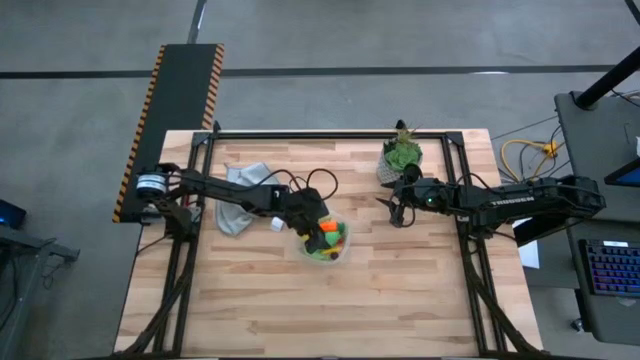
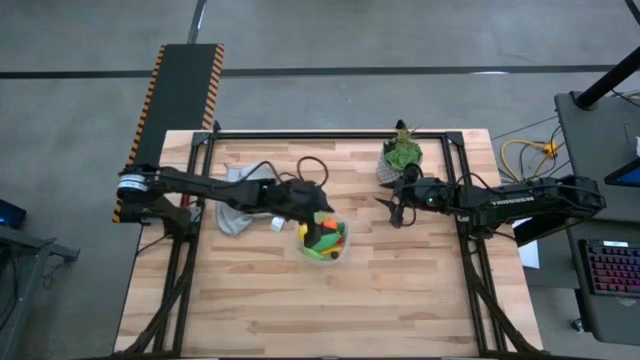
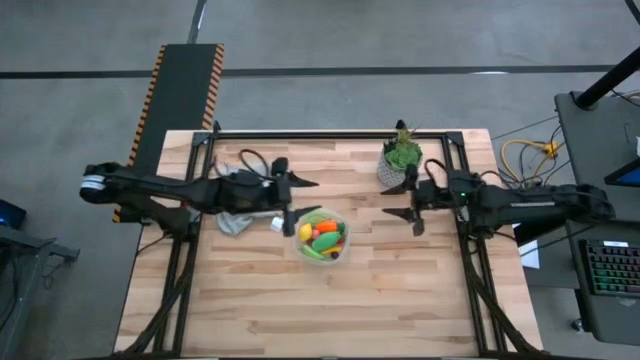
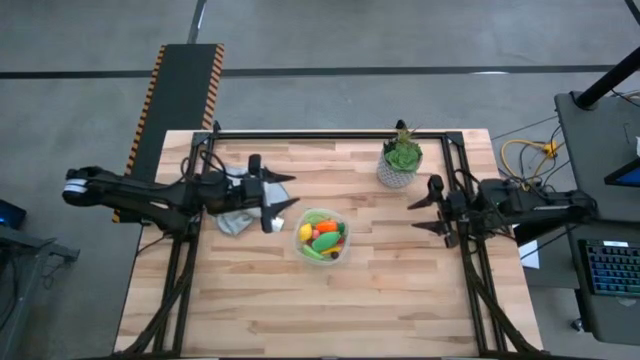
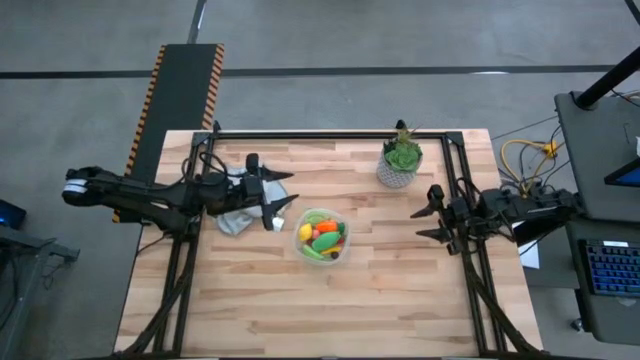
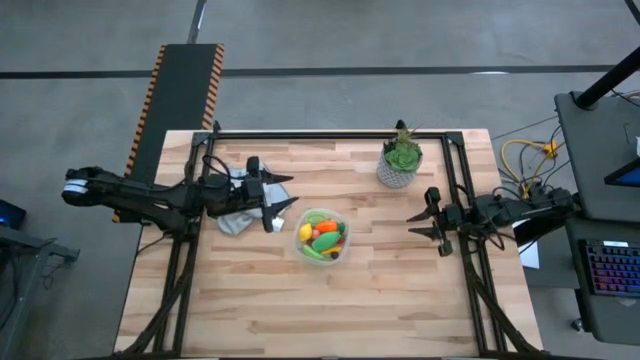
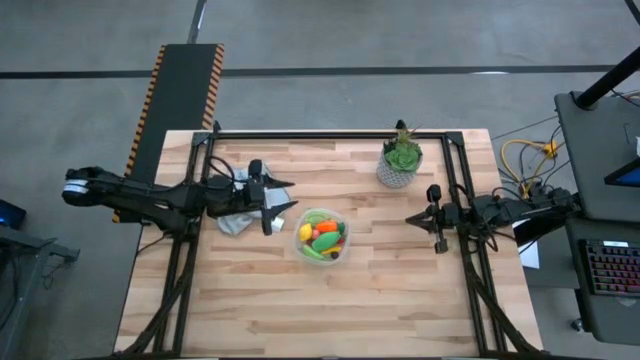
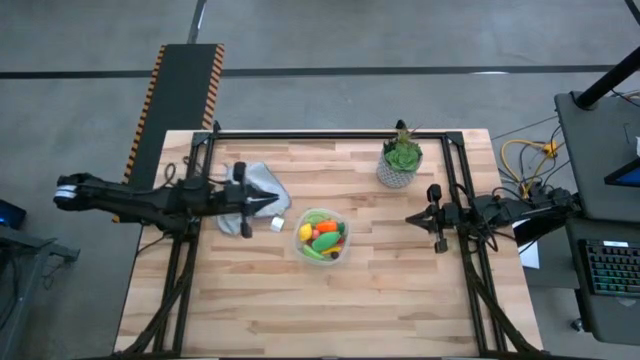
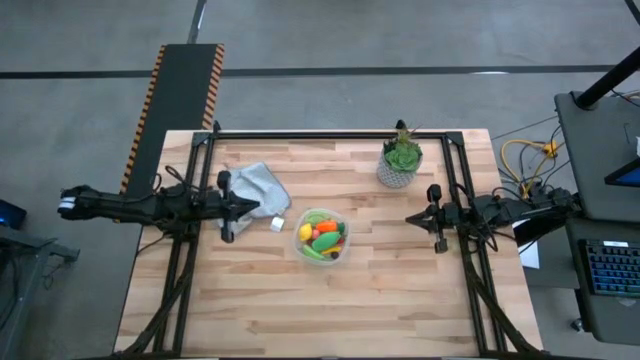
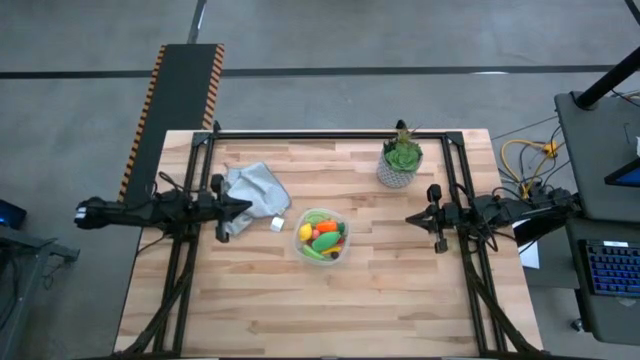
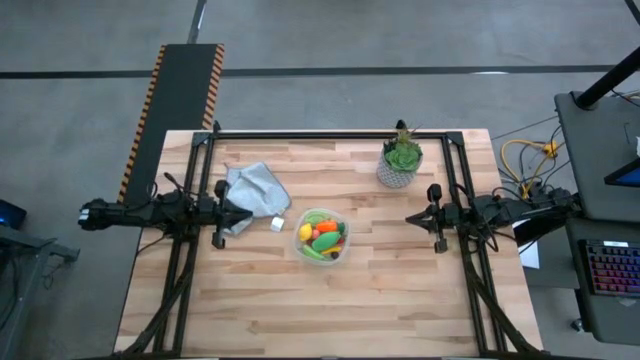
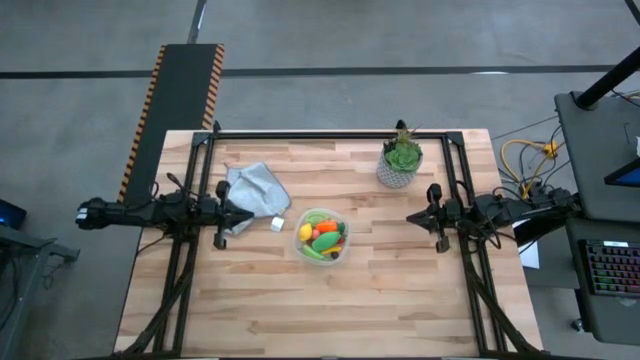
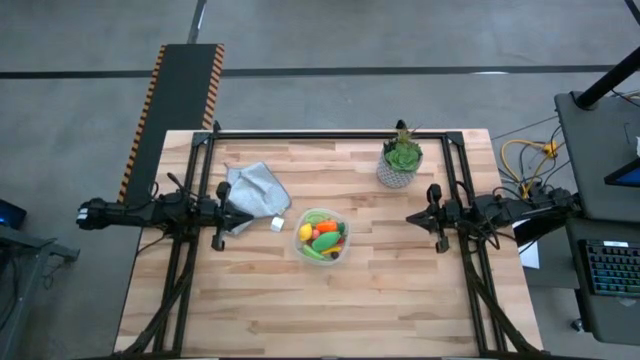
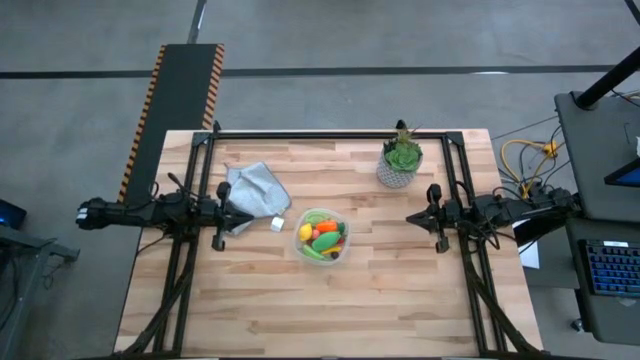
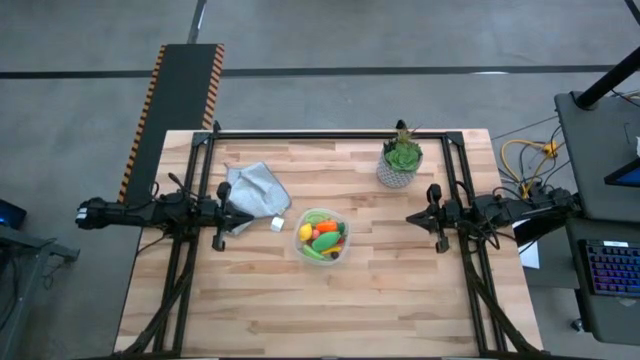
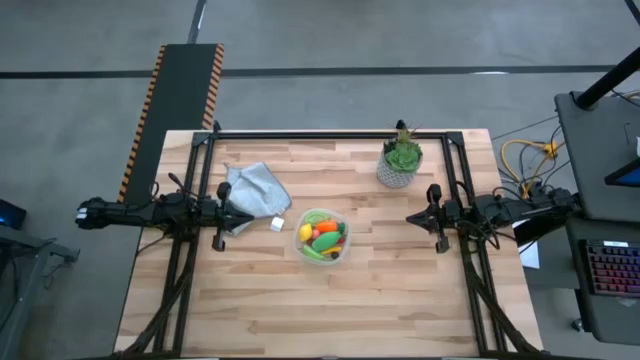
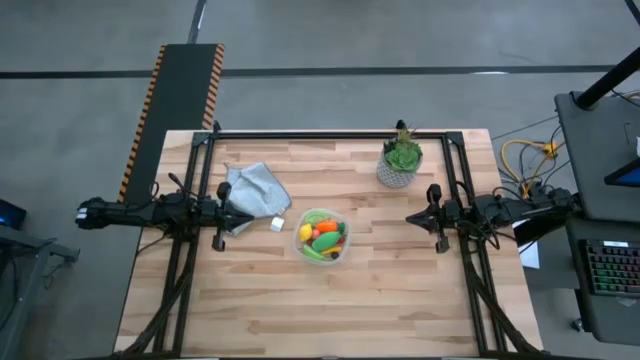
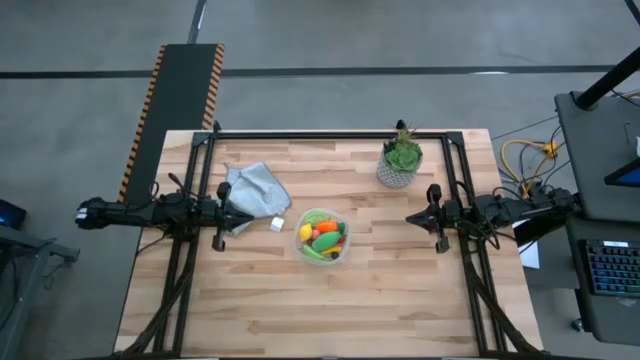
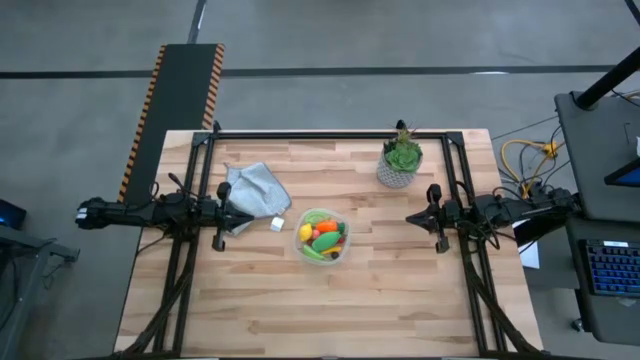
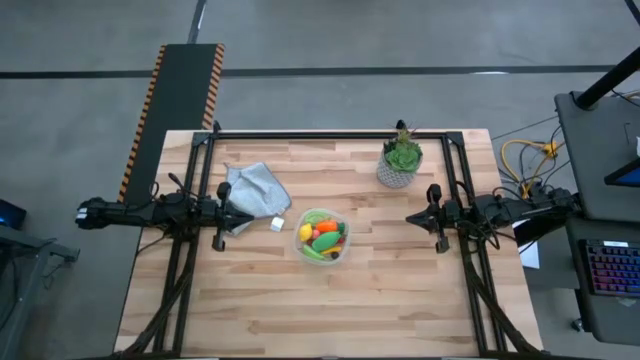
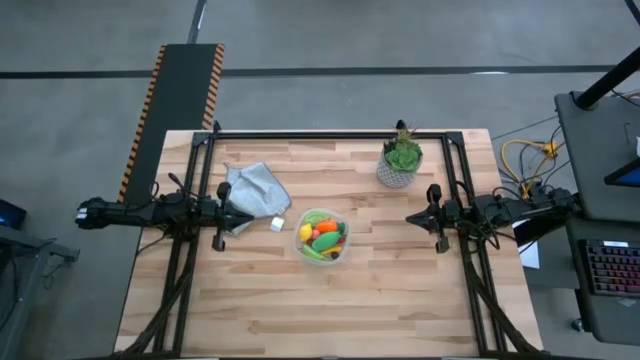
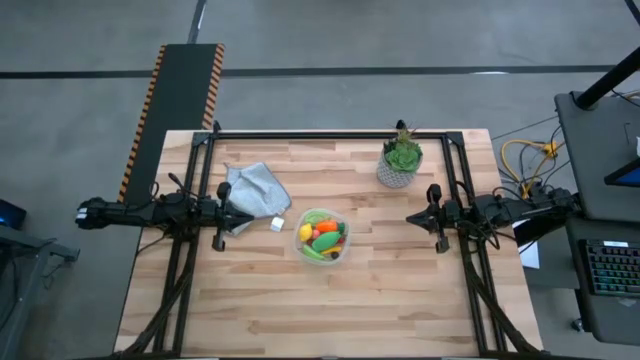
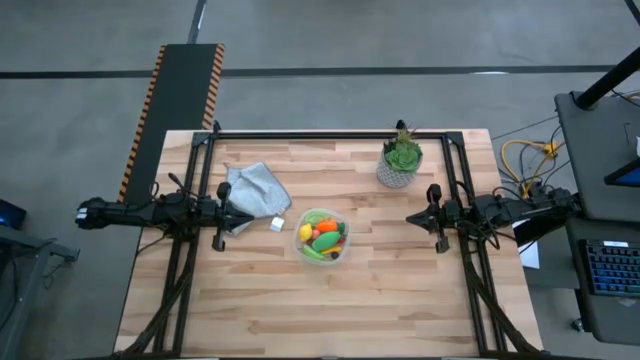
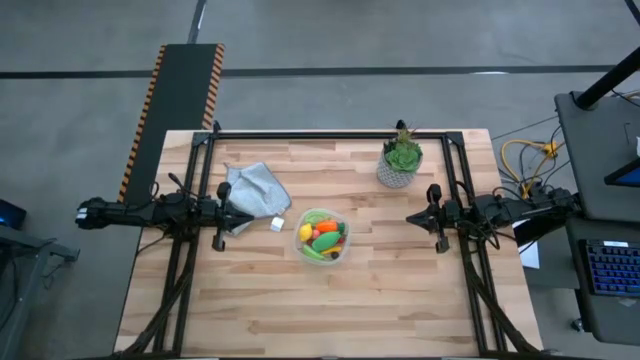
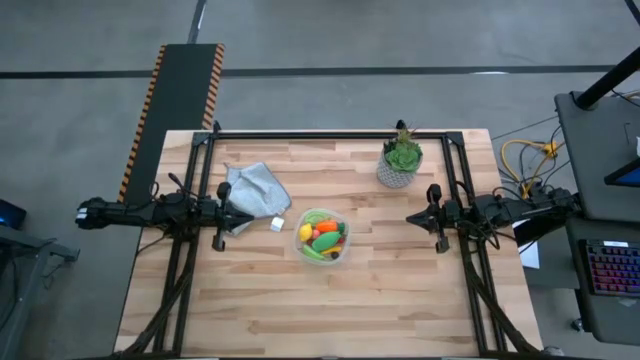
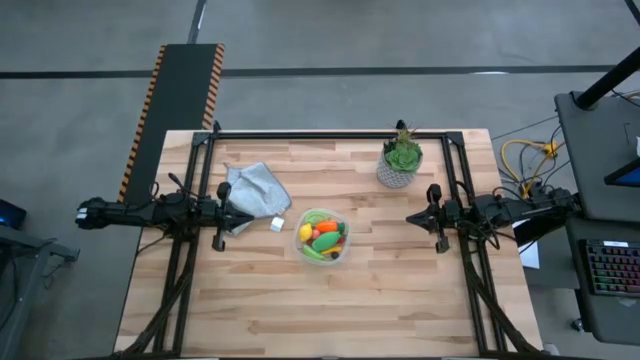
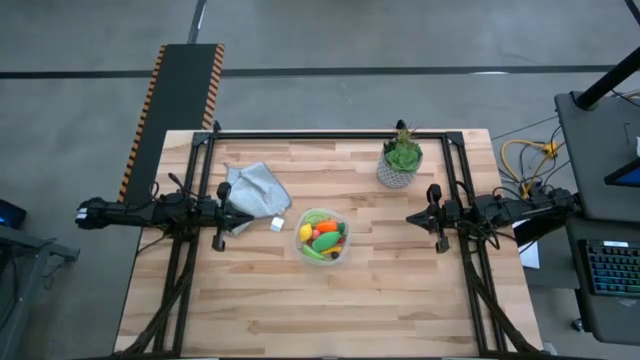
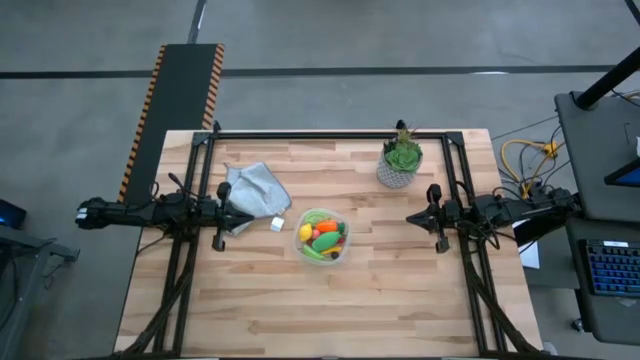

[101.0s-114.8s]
Task: Pick and placing Produce into tupperware
Return to Home Position

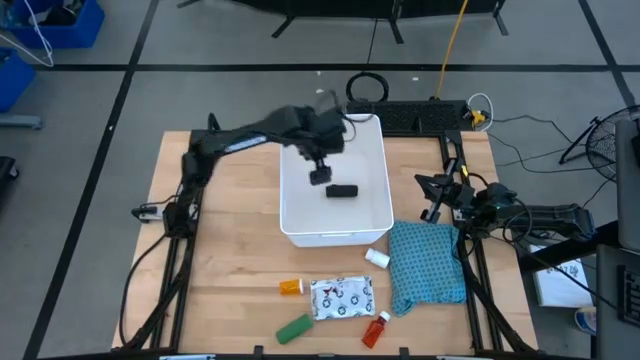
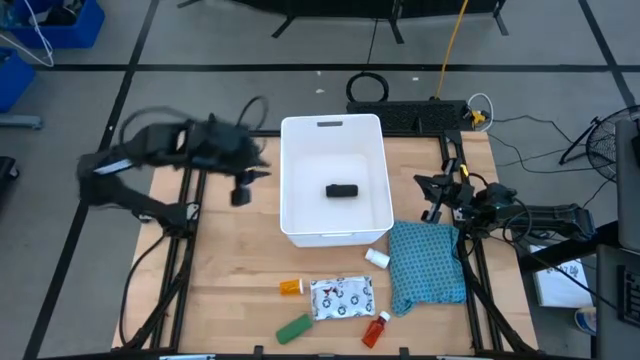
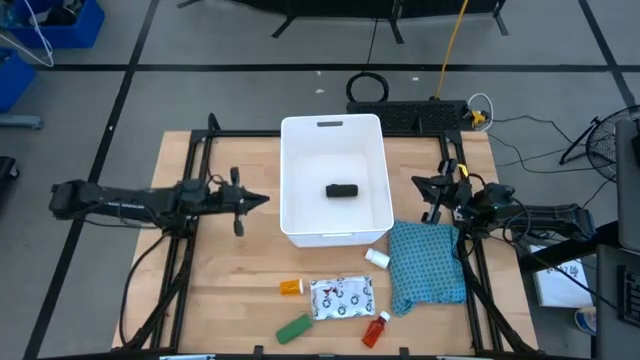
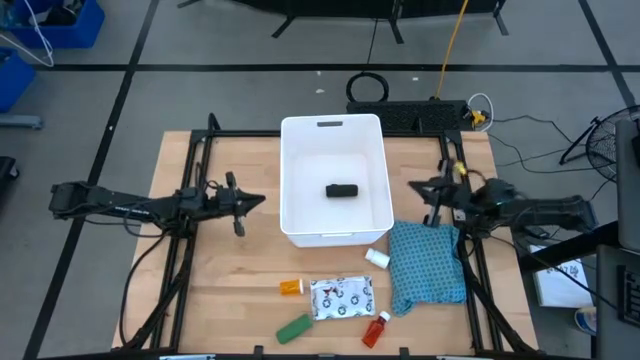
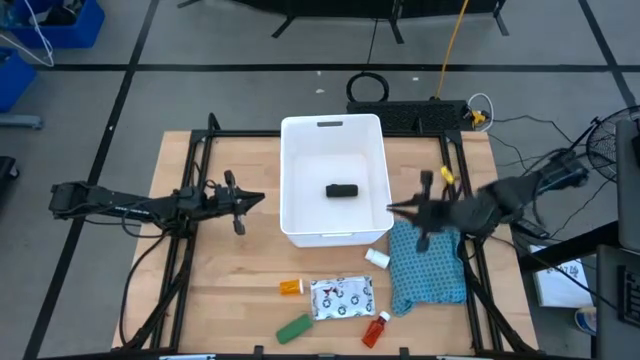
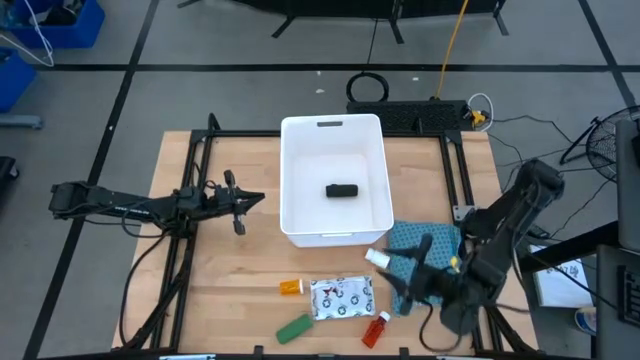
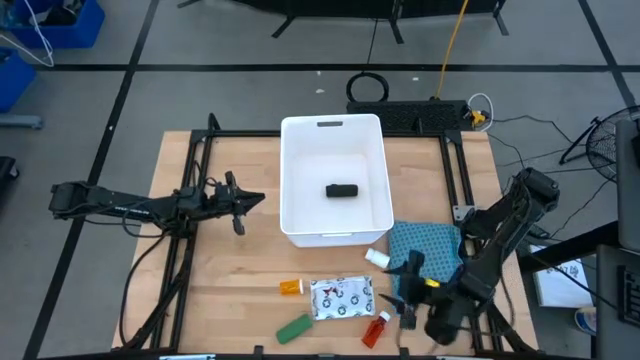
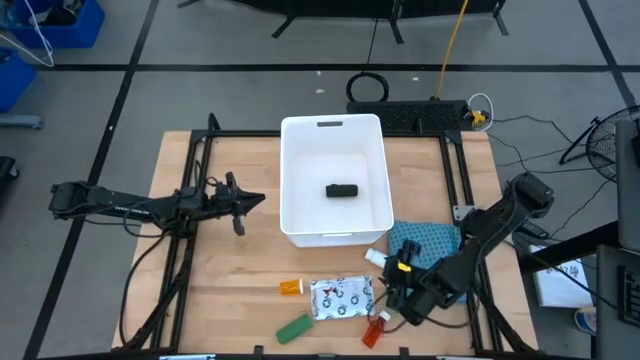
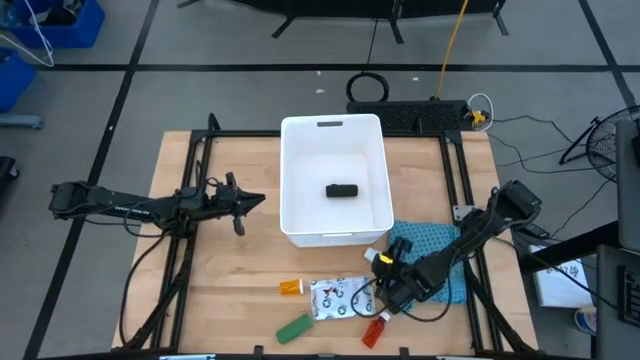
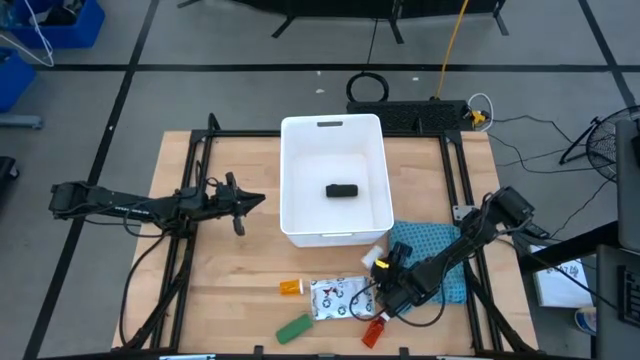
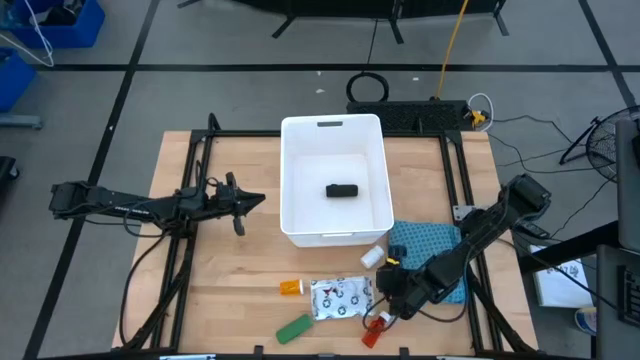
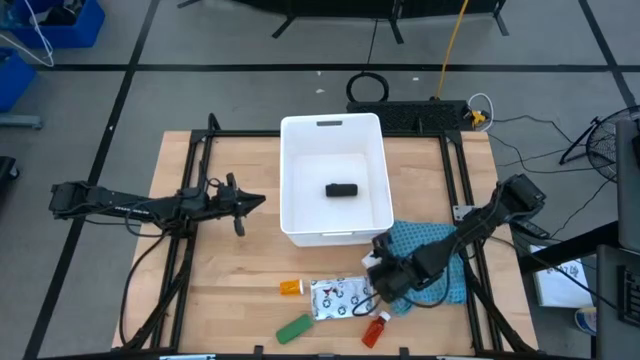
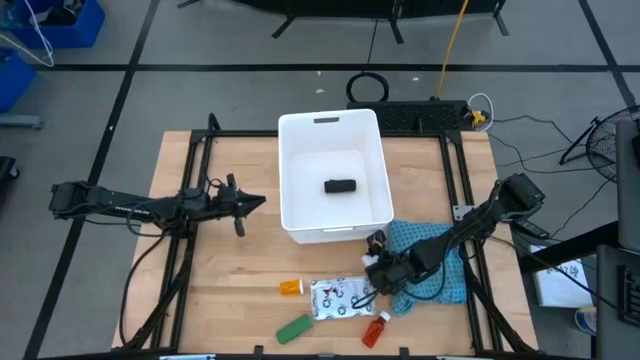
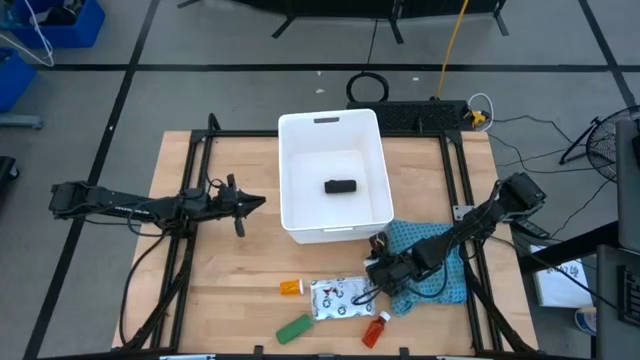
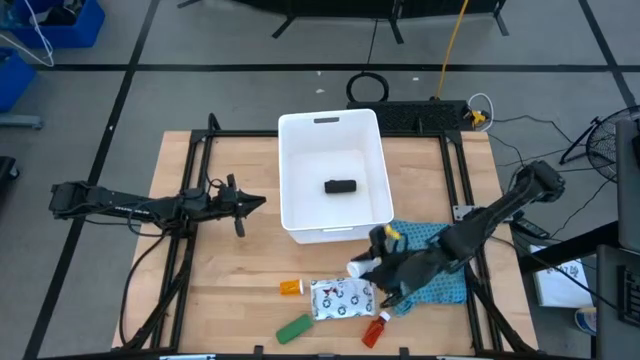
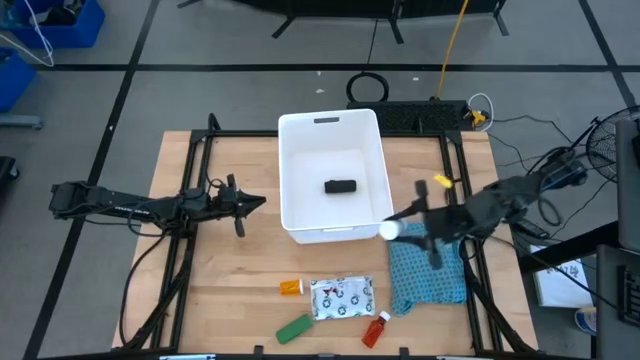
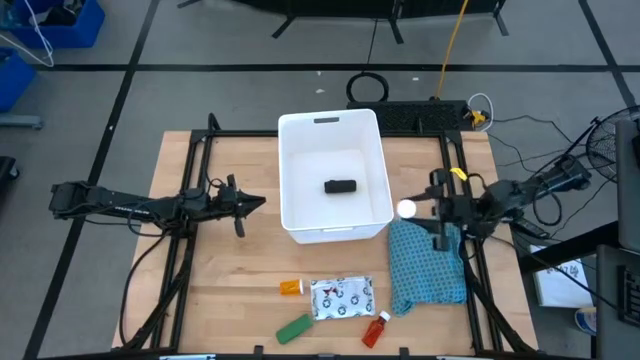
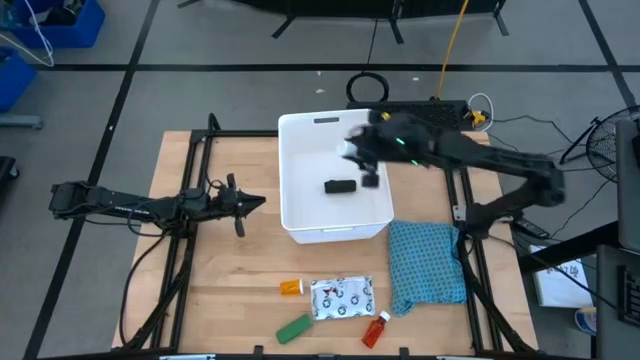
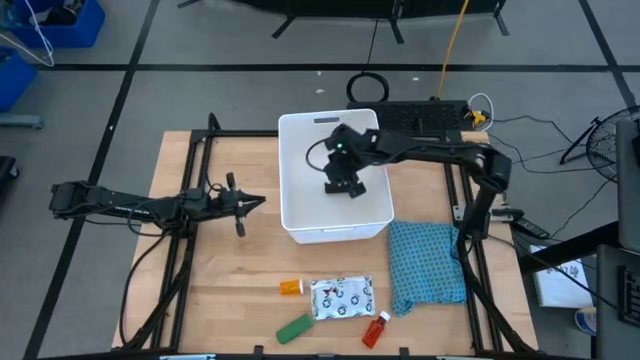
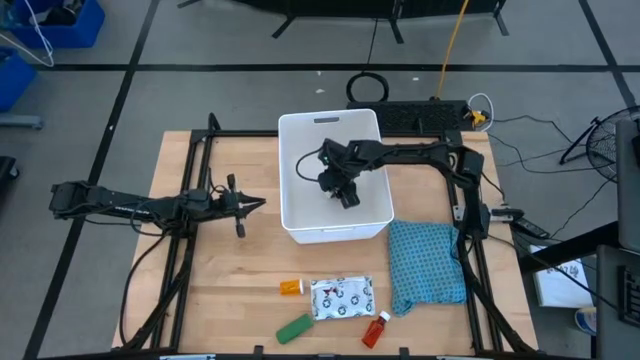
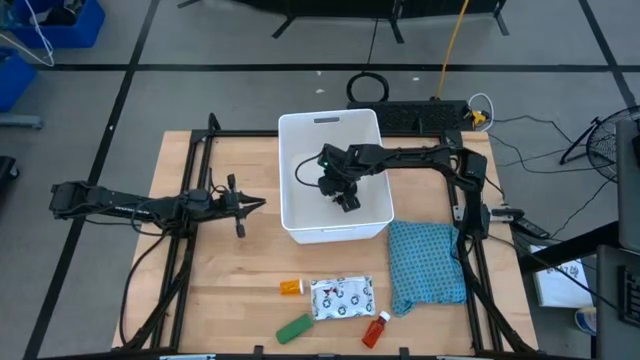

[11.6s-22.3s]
Task: Pick & place medical supplies in basket/bin
Put the white pill bottle into the white bin
